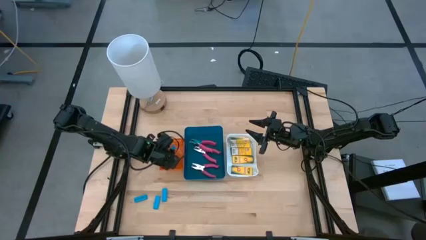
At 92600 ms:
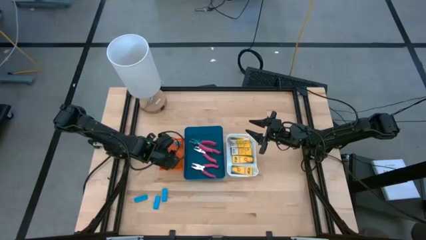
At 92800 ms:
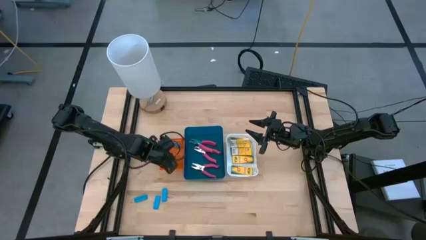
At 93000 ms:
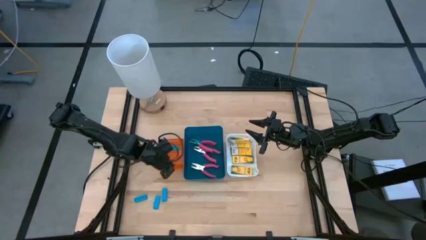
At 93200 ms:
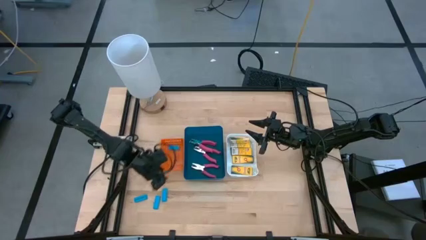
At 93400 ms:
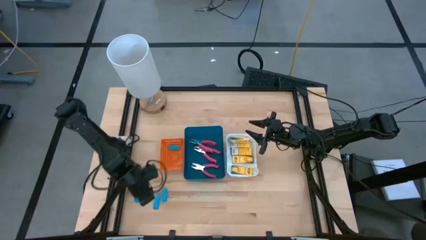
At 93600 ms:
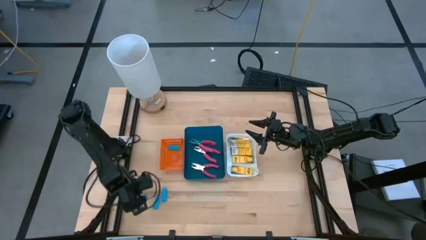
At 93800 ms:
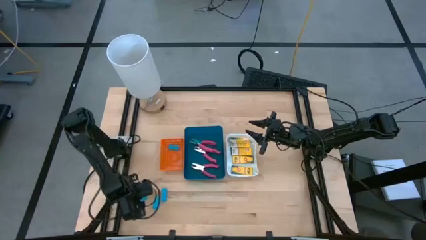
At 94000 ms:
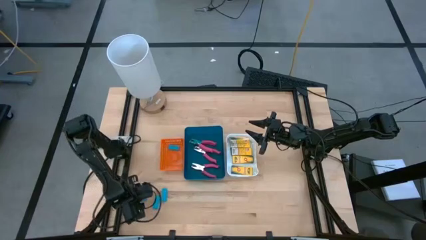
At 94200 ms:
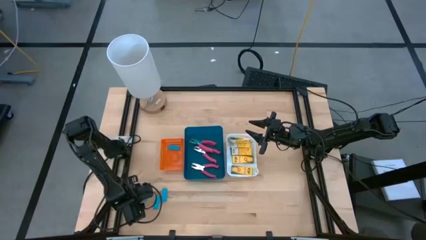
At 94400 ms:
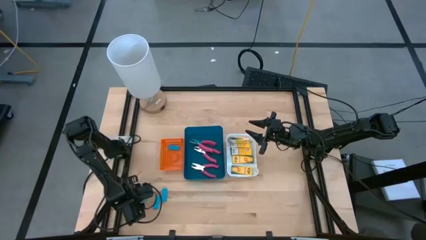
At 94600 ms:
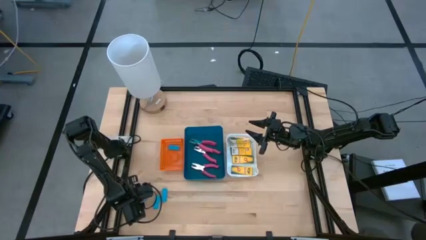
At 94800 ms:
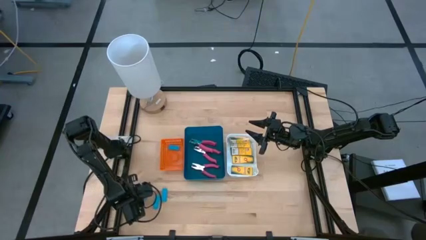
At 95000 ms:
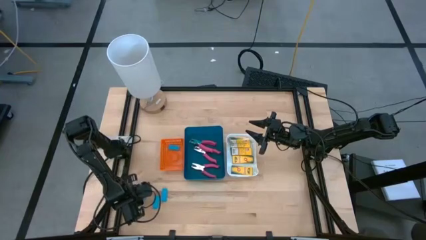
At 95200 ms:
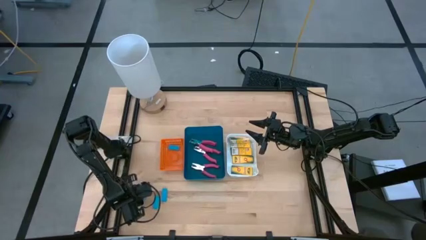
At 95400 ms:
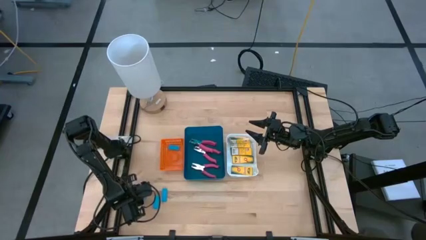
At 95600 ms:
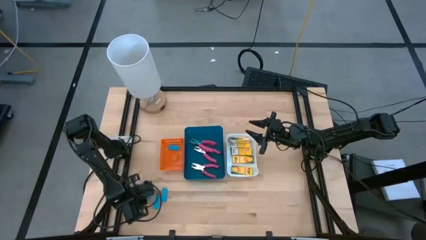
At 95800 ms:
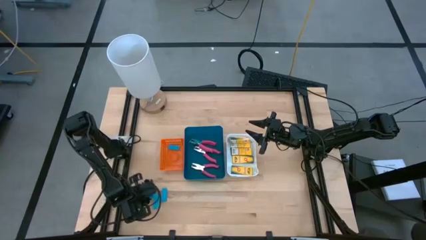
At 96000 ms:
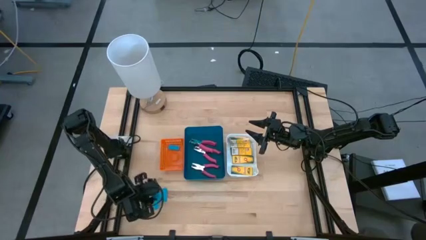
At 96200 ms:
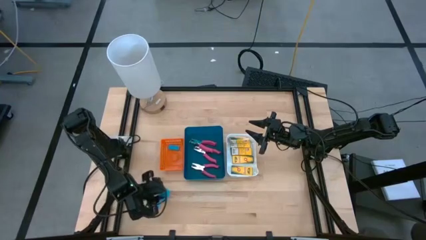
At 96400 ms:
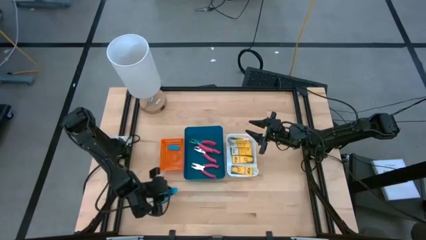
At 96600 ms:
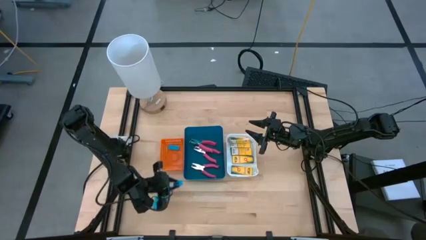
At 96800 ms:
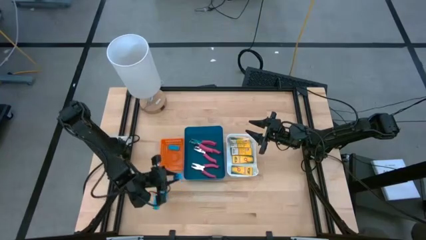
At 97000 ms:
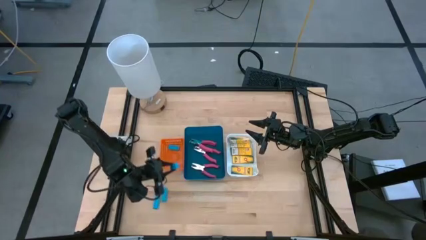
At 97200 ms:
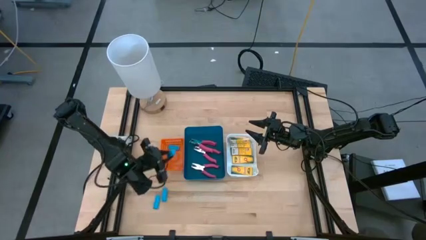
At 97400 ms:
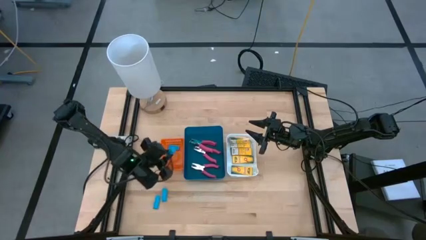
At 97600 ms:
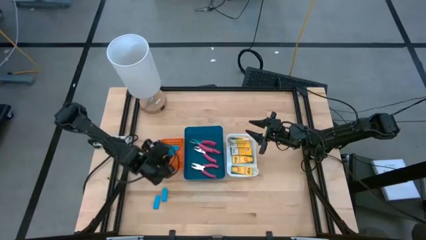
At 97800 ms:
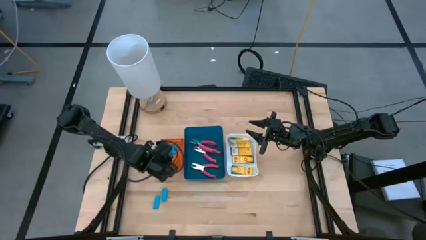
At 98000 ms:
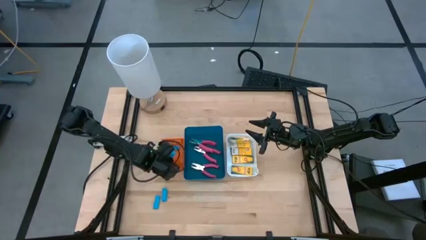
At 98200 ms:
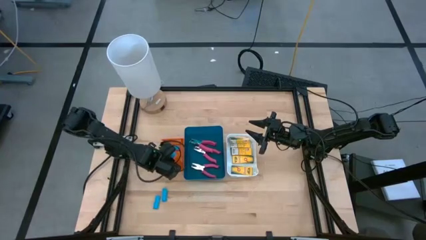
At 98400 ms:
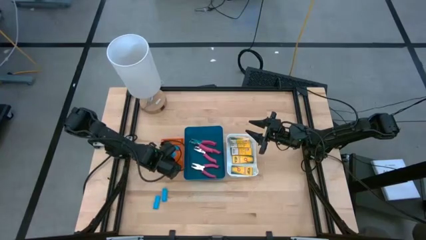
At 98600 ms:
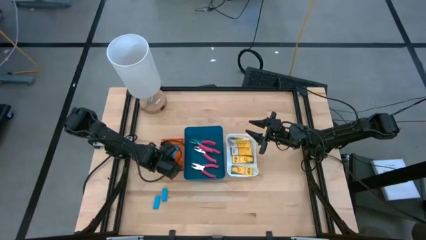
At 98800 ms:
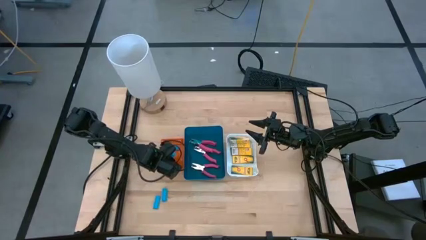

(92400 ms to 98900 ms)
Task: Pick & Place School Supplies
Put the blue eraser into the orange bin

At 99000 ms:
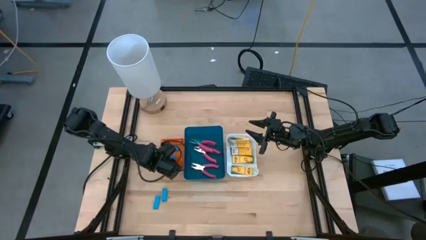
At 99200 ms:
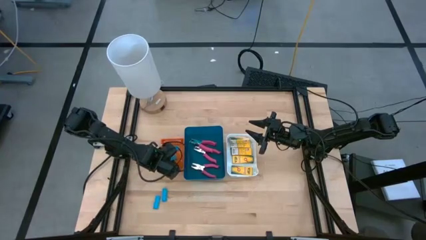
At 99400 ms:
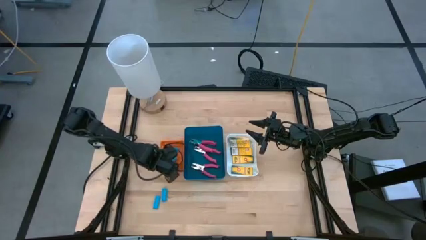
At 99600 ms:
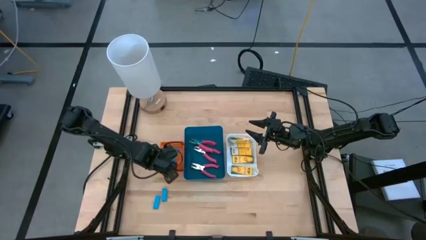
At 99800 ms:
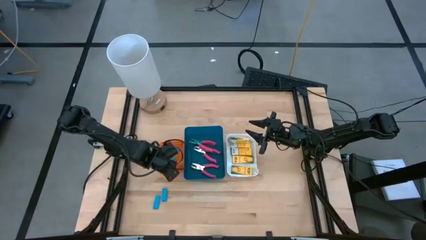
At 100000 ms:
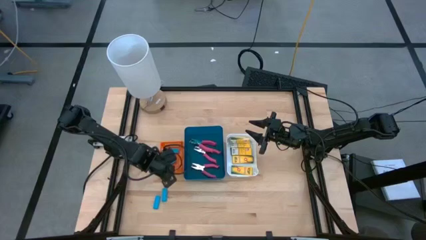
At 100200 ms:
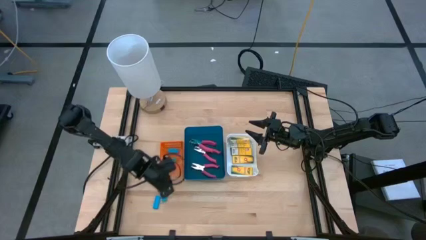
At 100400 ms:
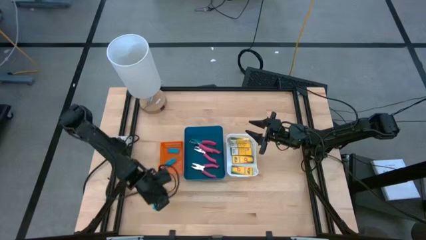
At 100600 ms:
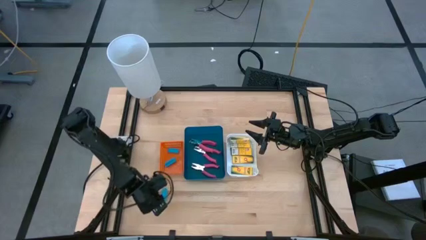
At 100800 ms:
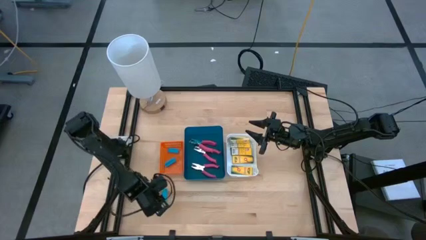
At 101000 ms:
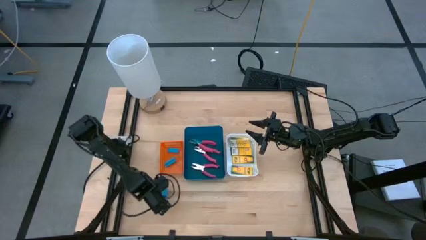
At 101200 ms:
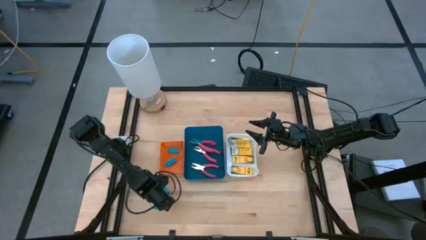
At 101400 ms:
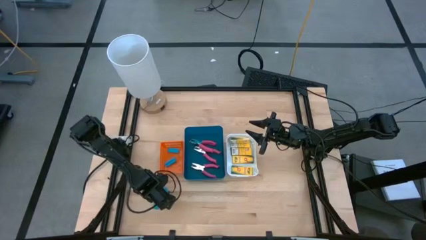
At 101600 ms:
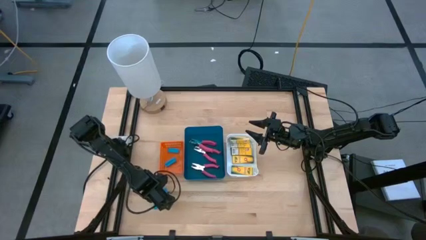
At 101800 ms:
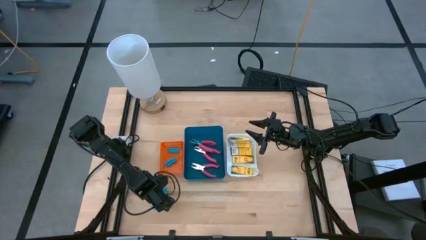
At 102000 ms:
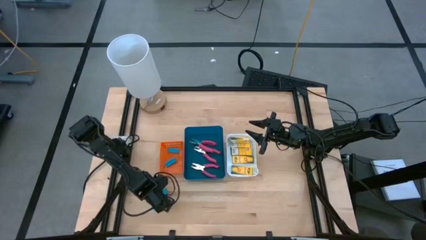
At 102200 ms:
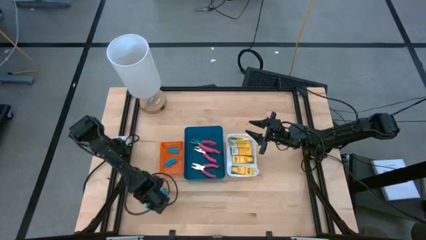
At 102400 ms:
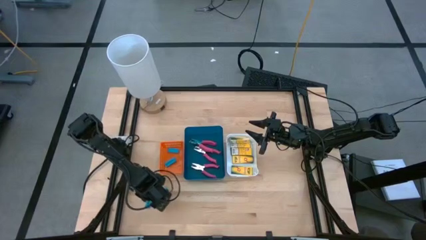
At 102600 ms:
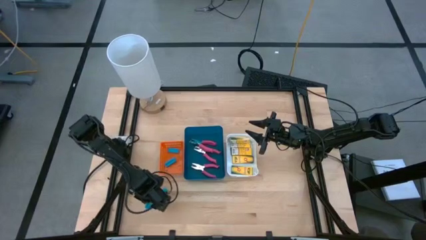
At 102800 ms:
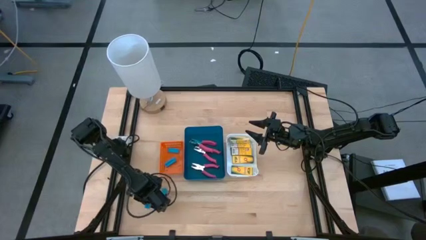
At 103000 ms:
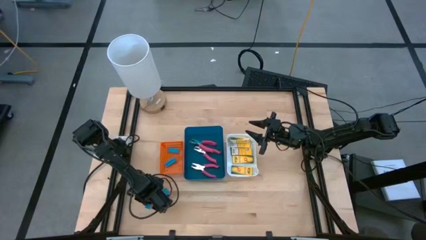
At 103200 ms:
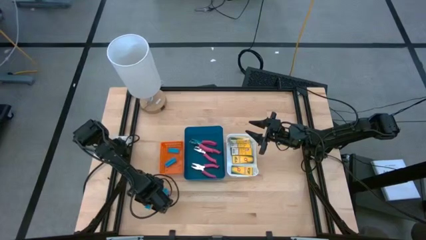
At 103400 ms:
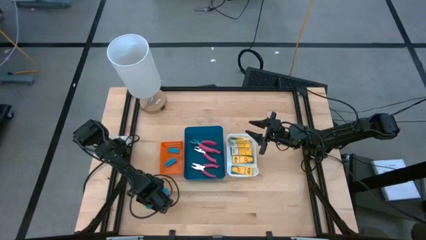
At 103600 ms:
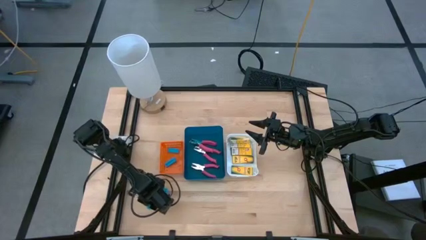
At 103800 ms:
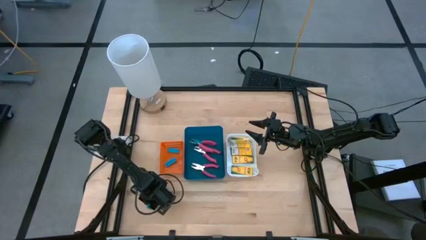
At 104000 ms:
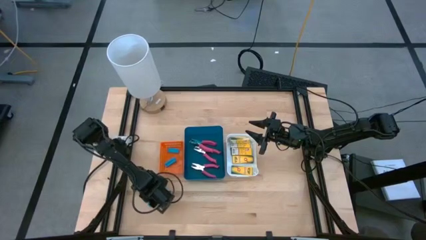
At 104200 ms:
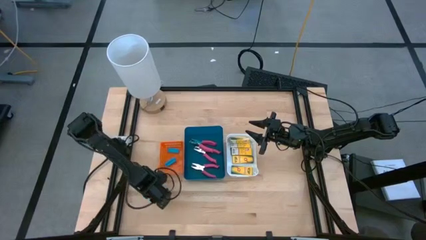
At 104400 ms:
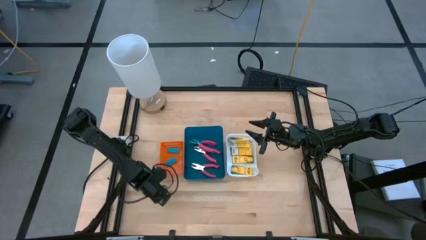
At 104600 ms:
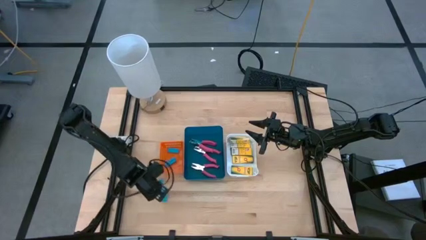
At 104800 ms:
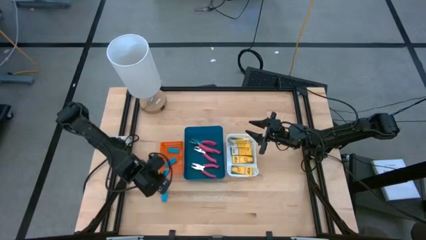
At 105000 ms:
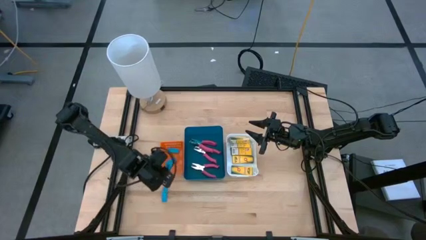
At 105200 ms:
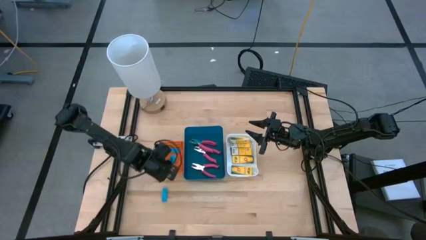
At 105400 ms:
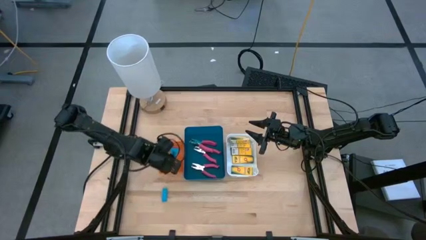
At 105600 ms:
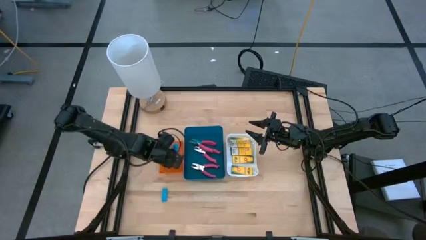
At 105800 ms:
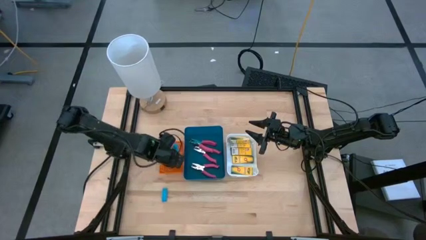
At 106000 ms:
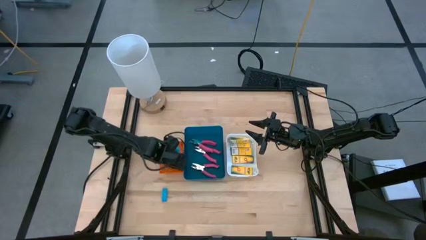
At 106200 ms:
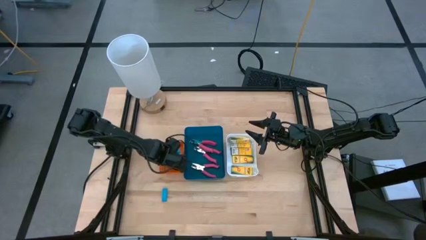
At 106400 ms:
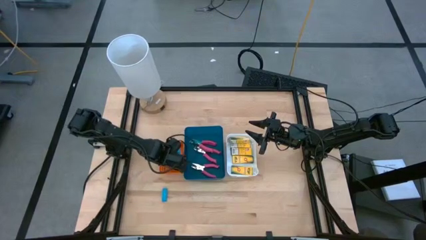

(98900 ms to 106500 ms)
Put the blue eraser into the orange bin

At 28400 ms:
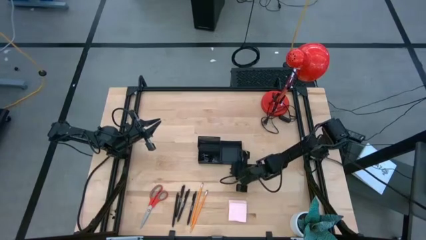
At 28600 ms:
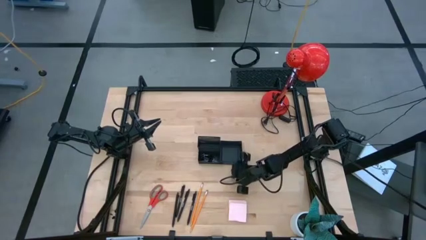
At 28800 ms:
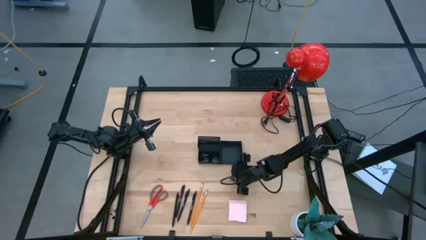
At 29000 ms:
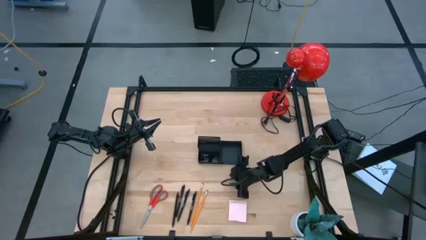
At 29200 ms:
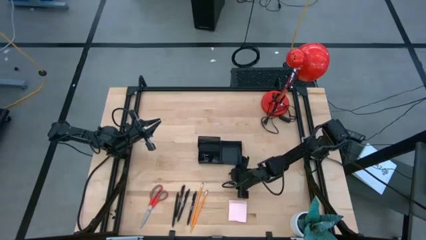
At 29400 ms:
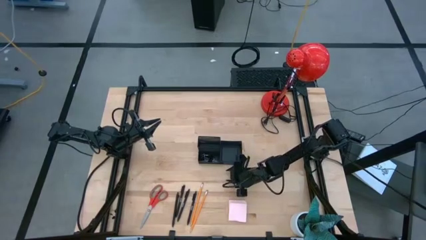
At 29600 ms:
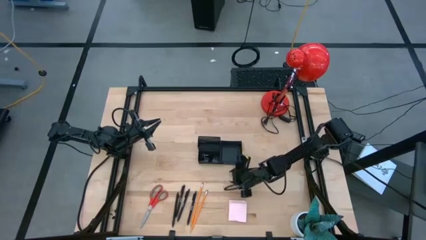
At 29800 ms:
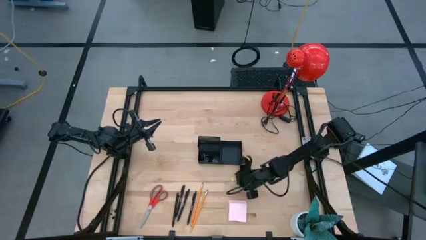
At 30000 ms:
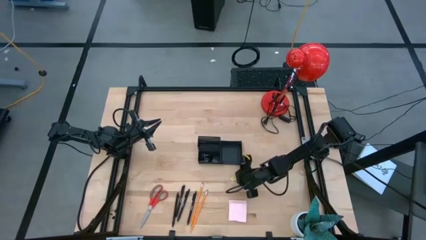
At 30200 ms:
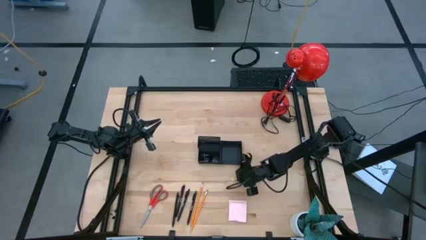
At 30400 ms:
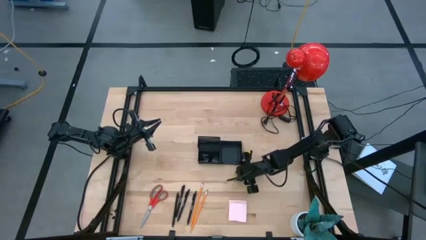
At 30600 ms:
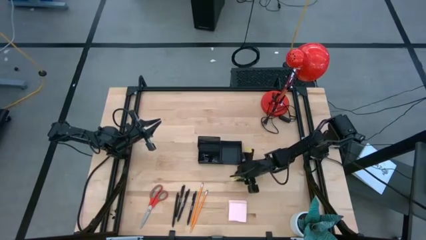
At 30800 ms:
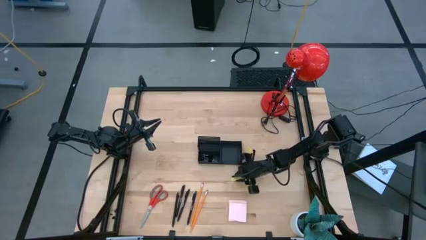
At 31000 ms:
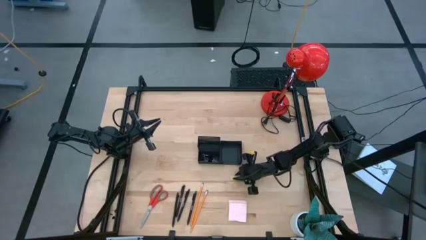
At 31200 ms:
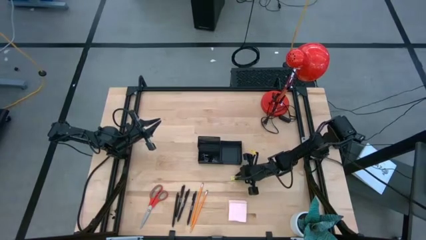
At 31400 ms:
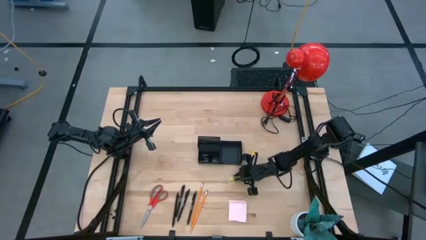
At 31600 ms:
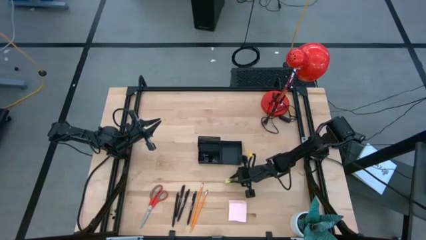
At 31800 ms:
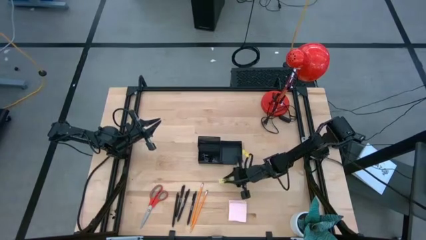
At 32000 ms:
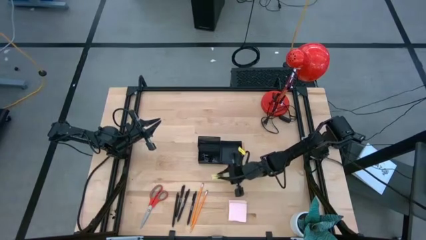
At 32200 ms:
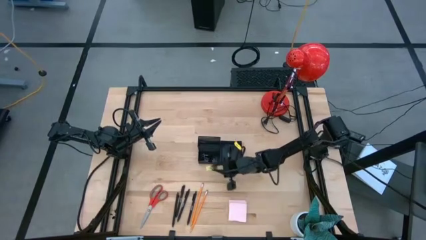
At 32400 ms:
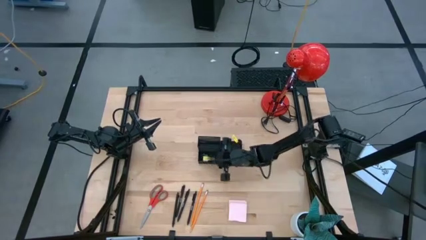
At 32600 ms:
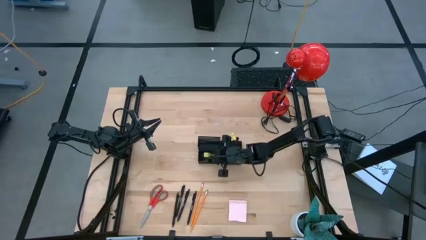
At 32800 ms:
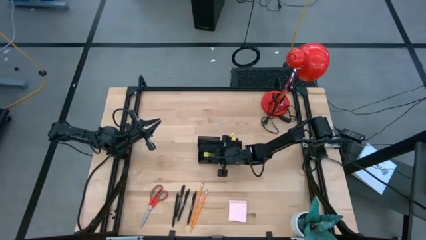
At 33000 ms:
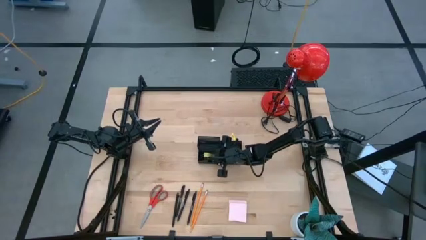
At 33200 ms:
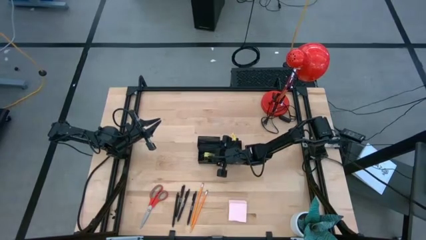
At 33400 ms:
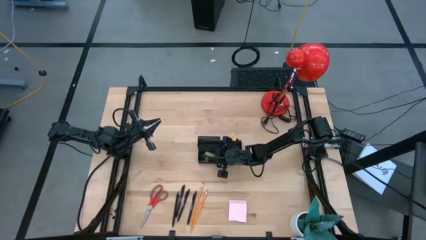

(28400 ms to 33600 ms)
Task: Pick and place office supplies into organizer
Put the yellow eraser into the black desk organizer
